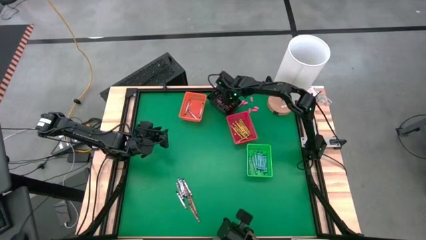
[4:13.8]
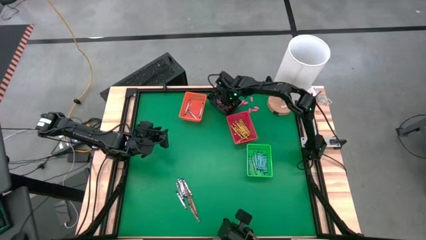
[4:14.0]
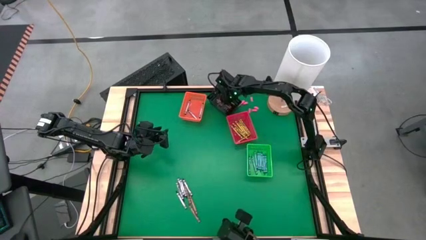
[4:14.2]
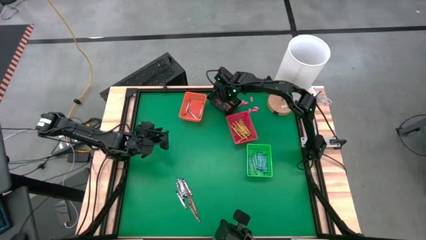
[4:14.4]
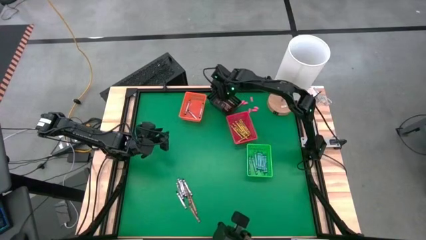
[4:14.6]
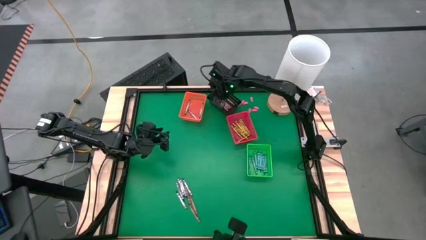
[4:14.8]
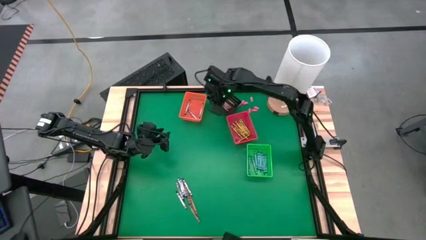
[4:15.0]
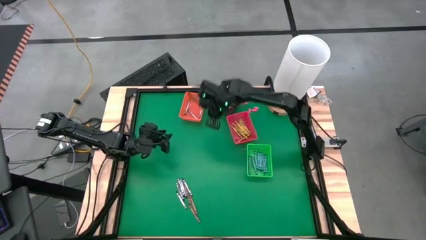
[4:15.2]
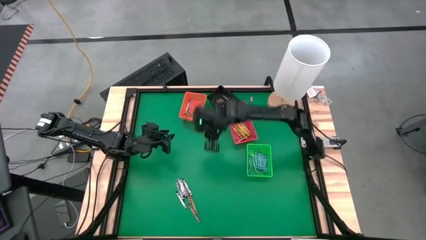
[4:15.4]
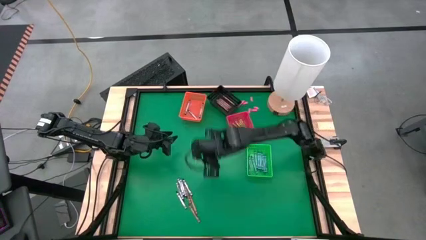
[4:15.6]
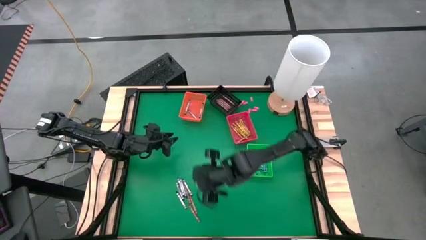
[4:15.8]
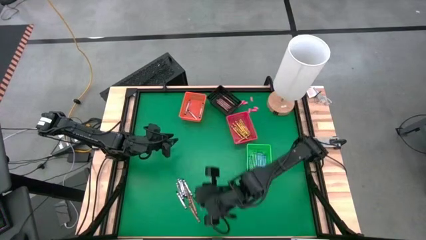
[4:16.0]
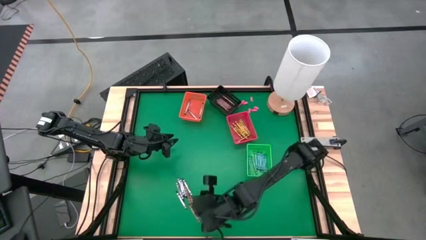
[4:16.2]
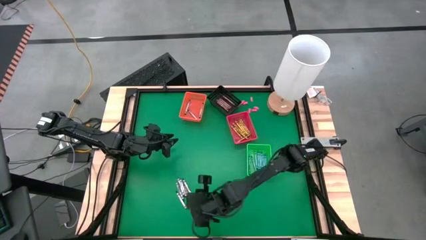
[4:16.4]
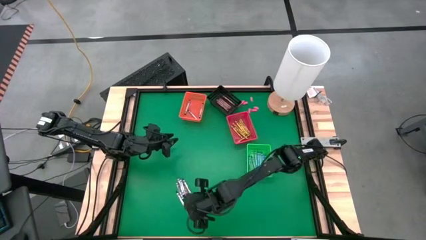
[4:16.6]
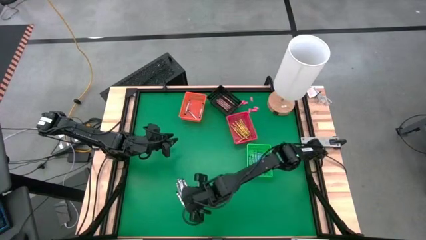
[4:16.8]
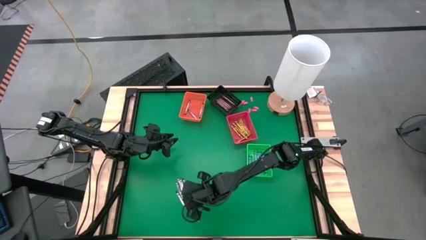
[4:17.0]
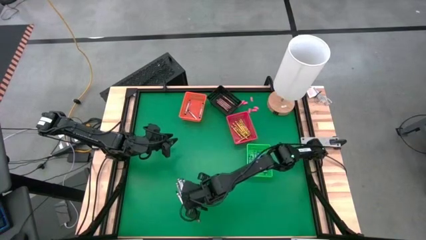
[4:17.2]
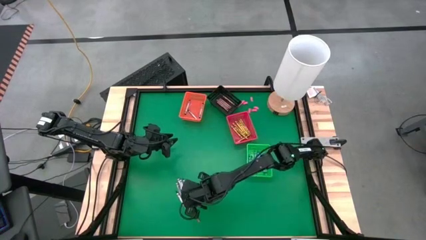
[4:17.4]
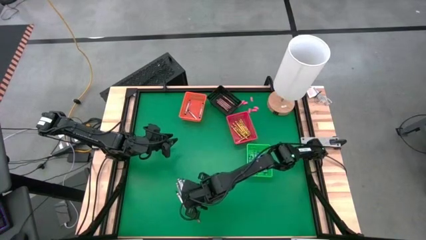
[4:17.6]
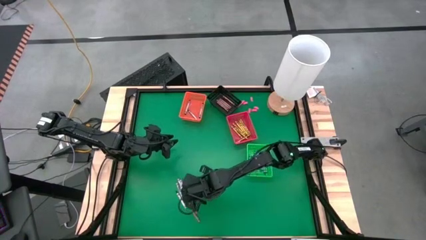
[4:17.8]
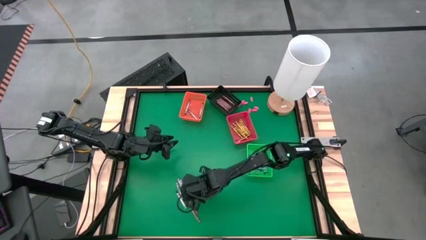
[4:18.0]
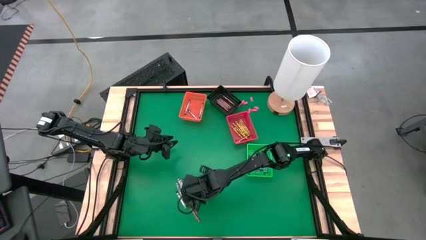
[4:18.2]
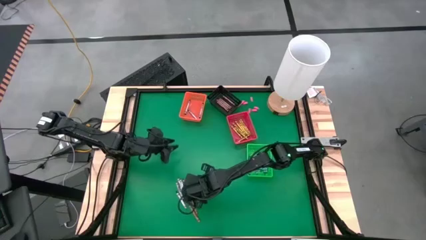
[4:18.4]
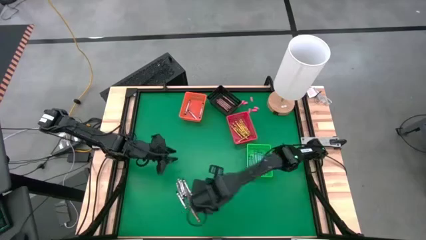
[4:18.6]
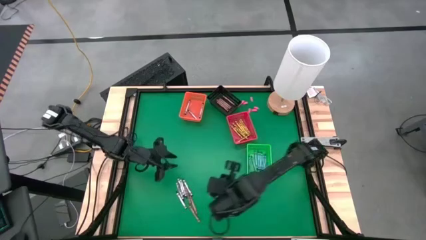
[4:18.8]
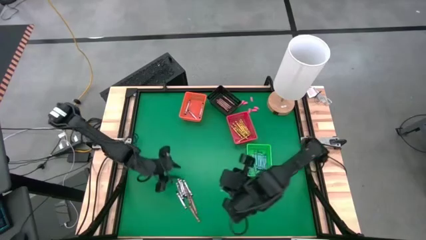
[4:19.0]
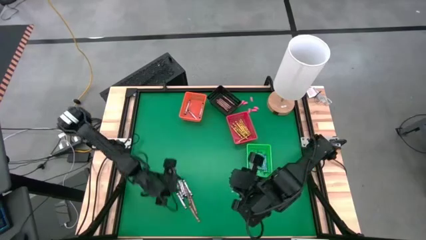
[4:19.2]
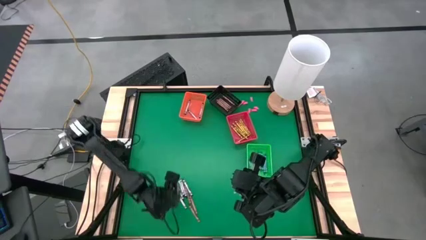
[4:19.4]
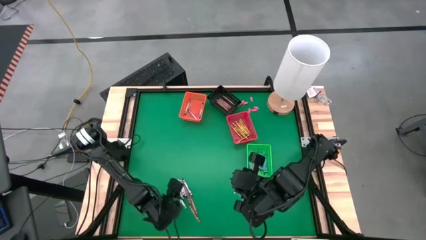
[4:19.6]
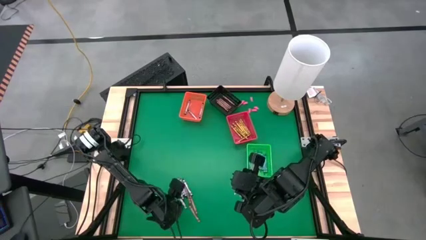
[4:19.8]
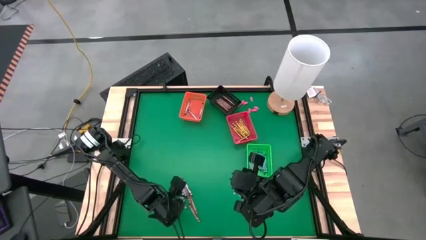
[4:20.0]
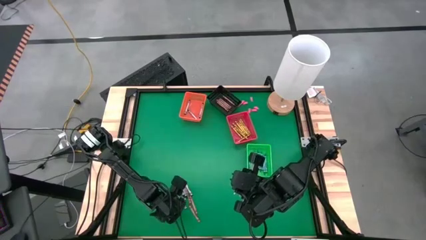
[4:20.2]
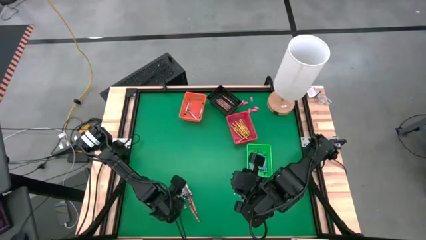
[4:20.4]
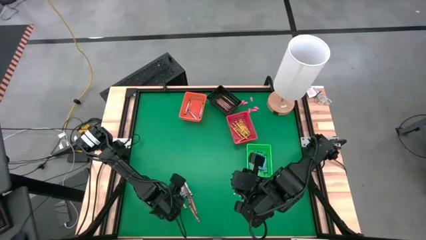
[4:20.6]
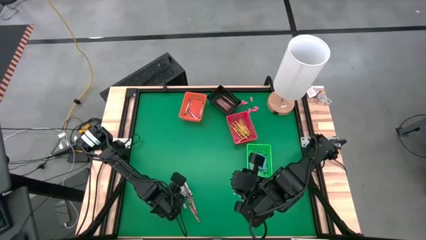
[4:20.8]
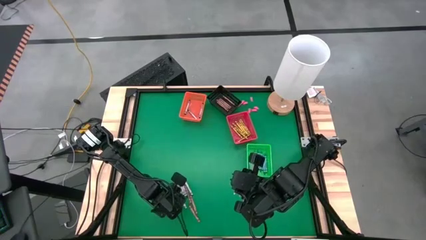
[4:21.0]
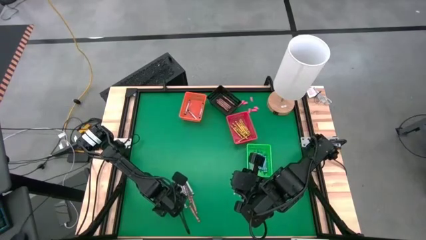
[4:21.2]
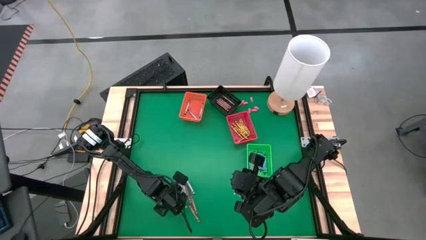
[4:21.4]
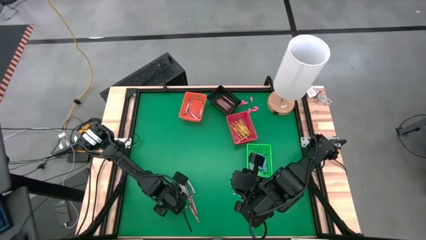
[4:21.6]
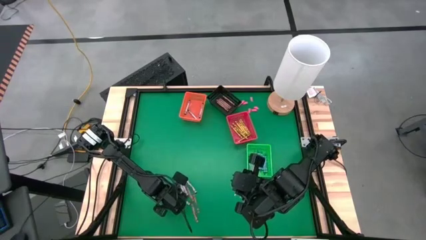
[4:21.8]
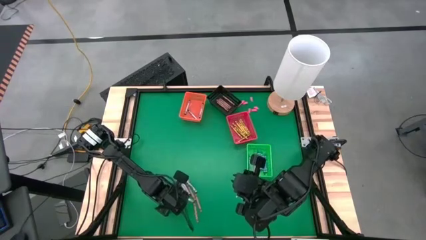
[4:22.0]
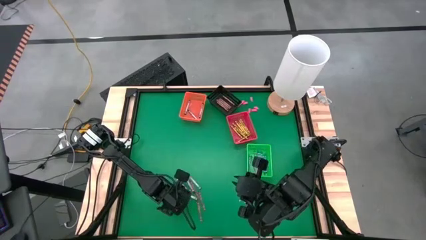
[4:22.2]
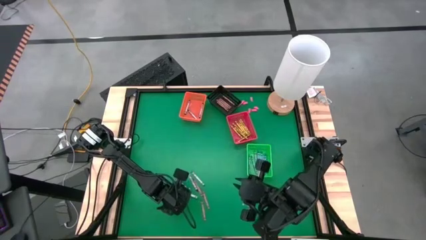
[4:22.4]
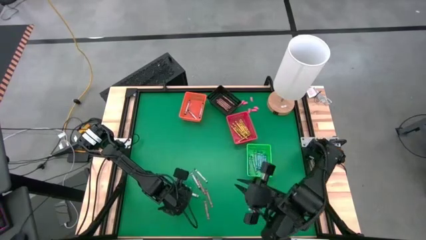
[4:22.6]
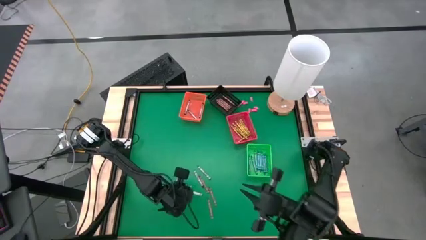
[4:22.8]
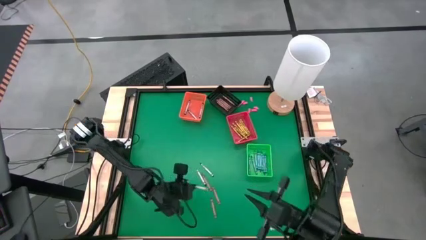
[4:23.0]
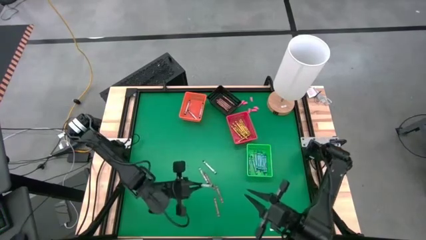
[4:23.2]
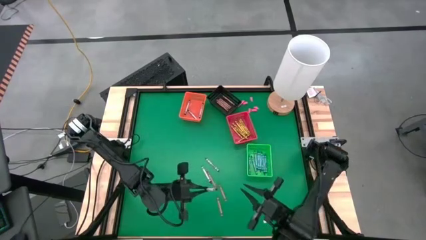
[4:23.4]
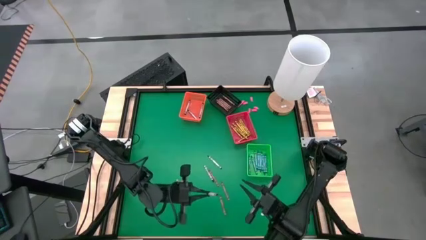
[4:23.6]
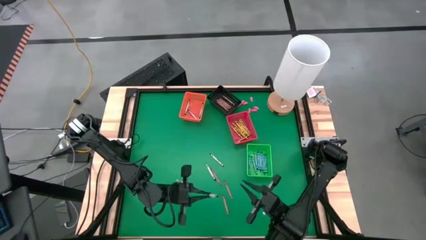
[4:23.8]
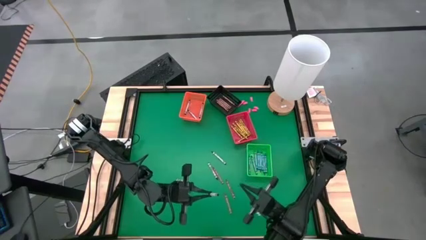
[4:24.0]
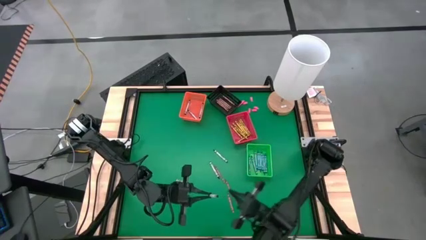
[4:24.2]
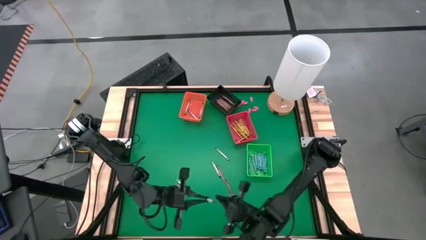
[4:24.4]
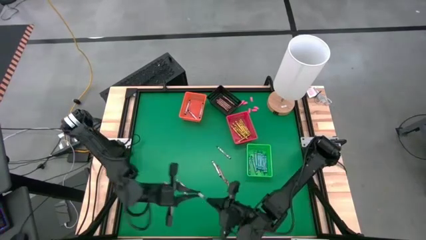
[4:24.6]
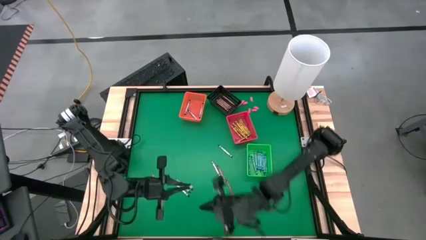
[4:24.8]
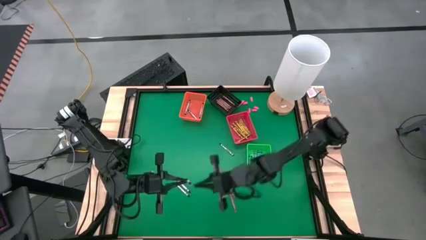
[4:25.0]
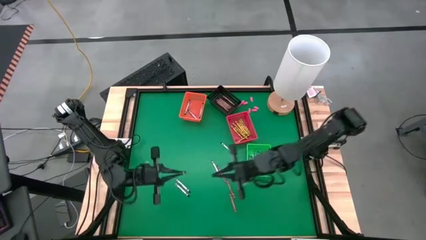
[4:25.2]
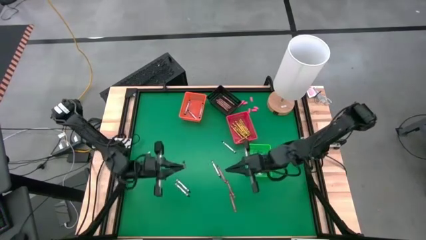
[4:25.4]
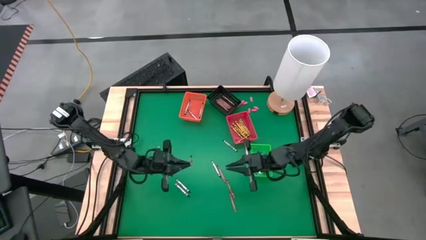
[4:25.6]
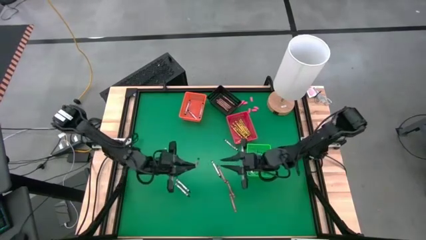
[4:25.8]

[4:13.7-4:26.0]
Task: Sort crayons
Put the black crayon into the orange bin
